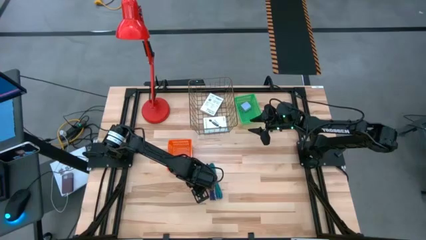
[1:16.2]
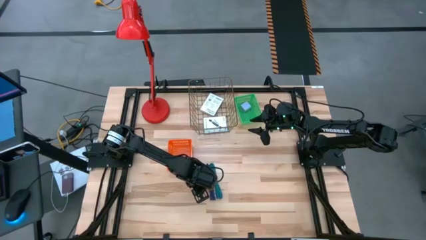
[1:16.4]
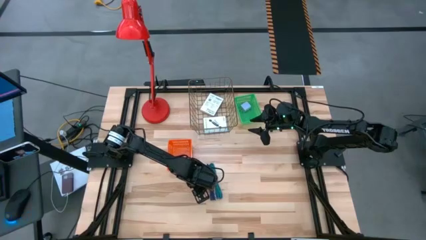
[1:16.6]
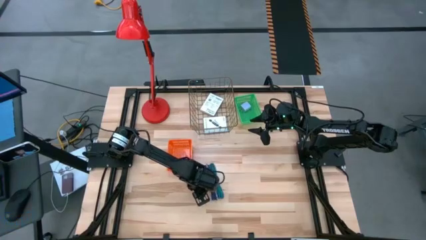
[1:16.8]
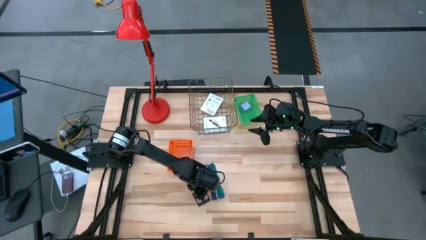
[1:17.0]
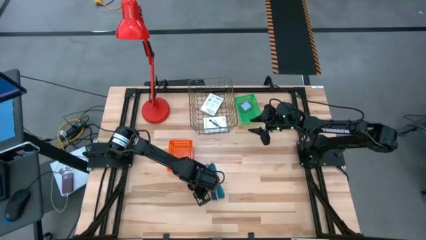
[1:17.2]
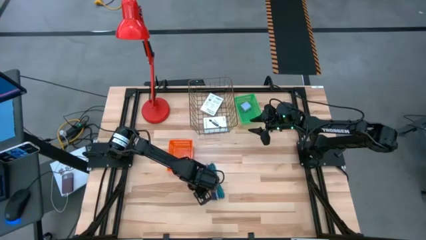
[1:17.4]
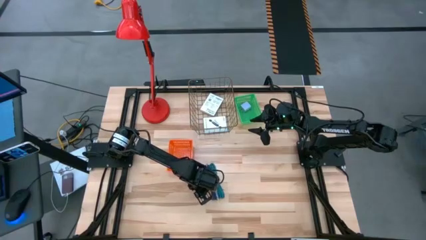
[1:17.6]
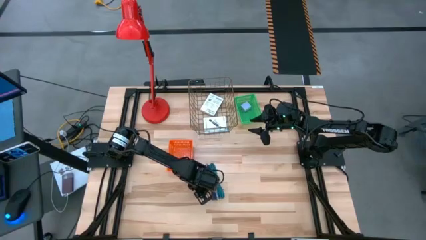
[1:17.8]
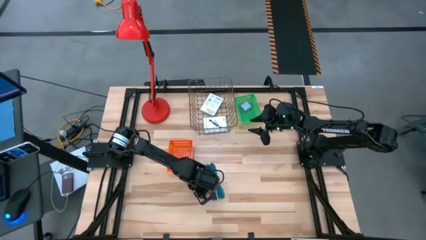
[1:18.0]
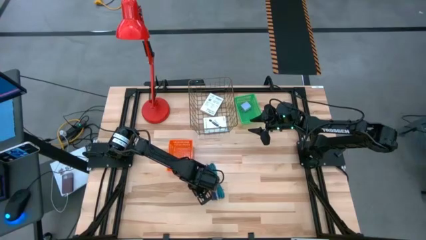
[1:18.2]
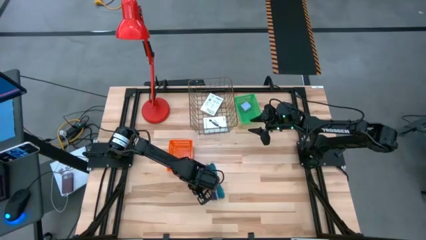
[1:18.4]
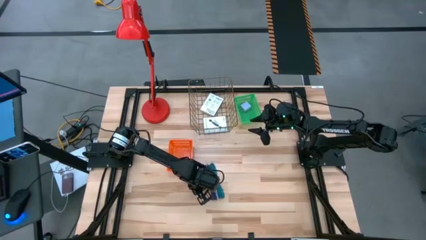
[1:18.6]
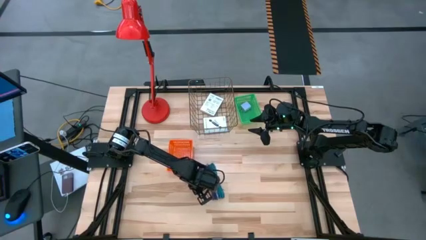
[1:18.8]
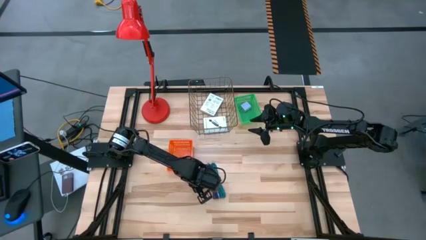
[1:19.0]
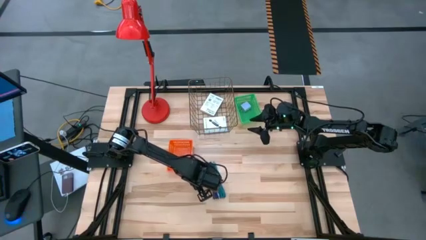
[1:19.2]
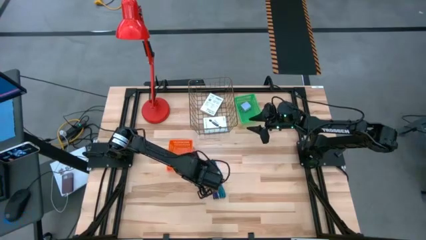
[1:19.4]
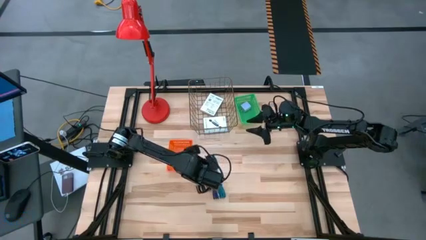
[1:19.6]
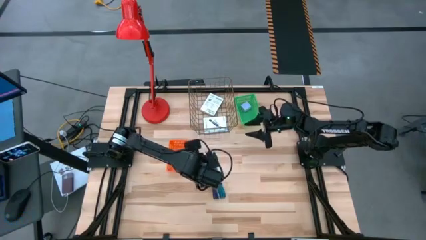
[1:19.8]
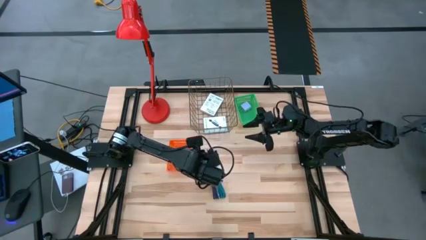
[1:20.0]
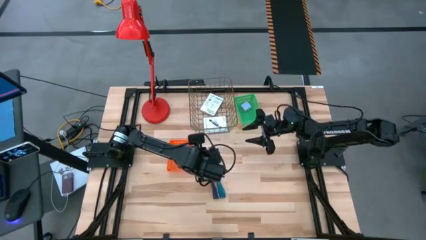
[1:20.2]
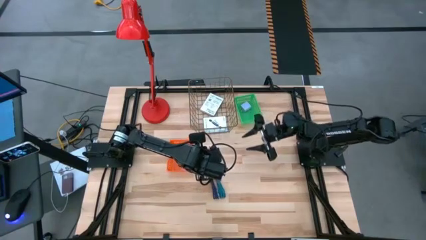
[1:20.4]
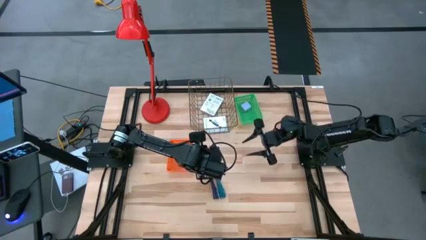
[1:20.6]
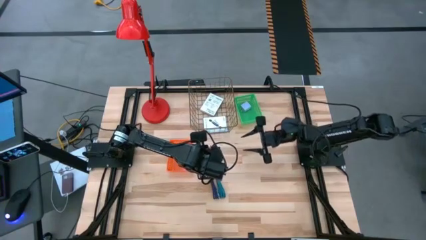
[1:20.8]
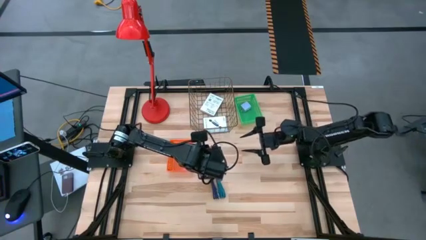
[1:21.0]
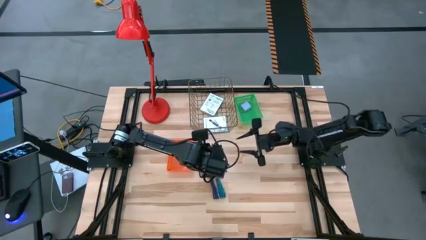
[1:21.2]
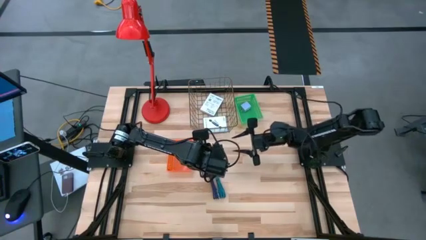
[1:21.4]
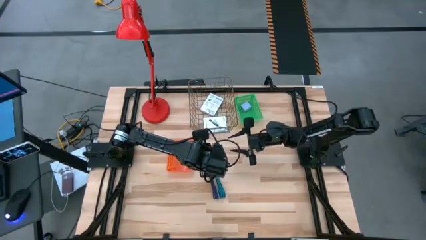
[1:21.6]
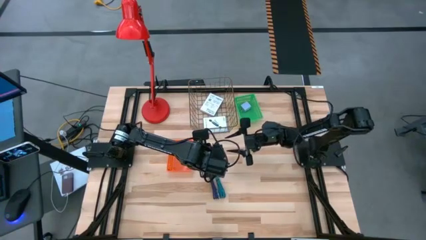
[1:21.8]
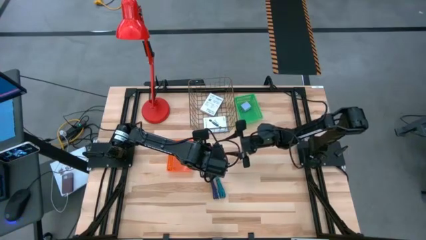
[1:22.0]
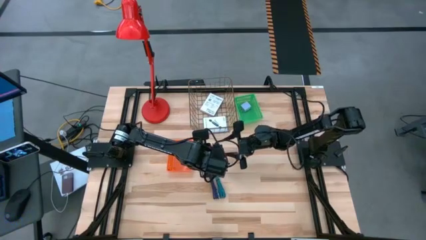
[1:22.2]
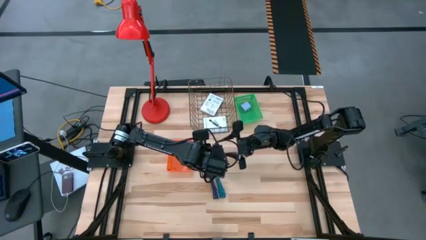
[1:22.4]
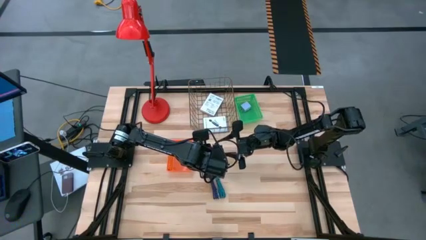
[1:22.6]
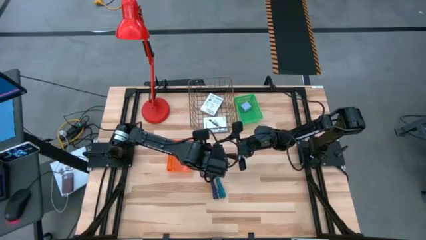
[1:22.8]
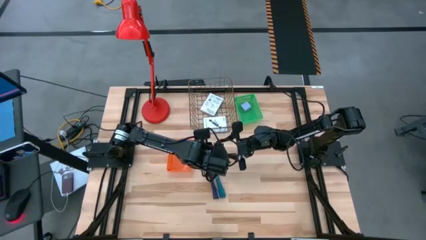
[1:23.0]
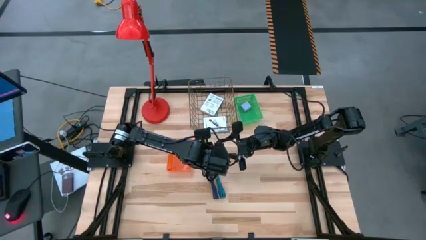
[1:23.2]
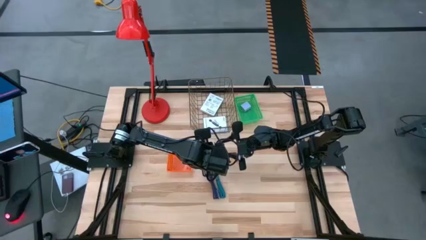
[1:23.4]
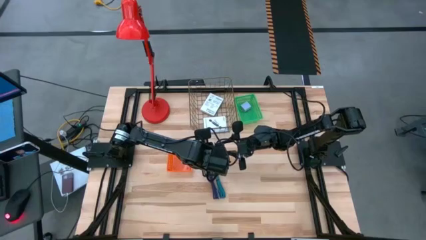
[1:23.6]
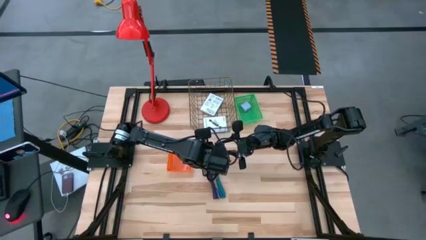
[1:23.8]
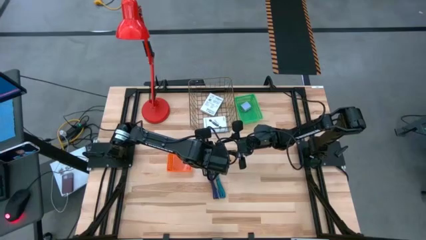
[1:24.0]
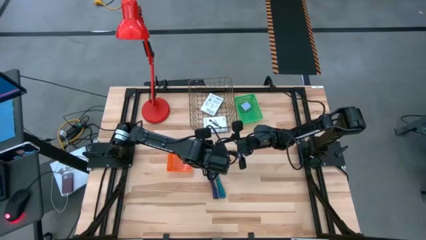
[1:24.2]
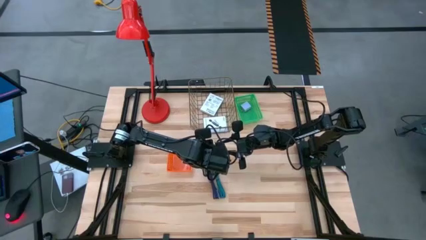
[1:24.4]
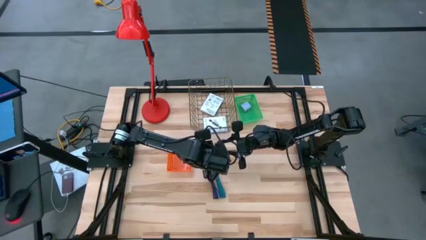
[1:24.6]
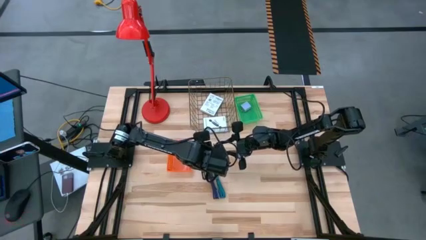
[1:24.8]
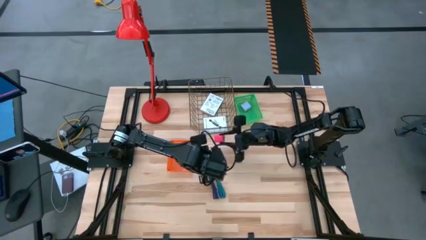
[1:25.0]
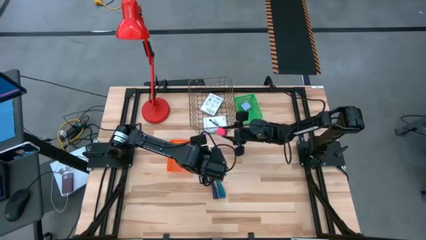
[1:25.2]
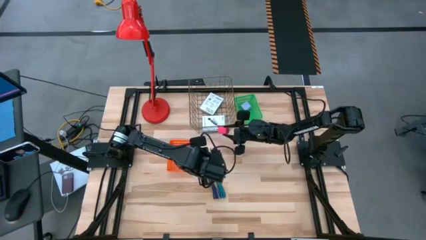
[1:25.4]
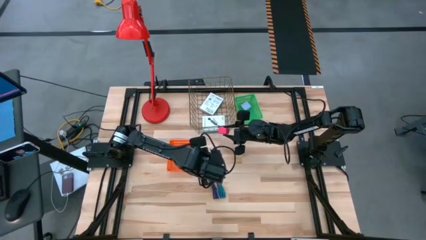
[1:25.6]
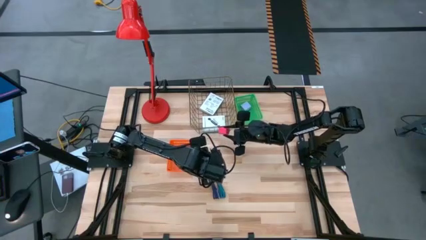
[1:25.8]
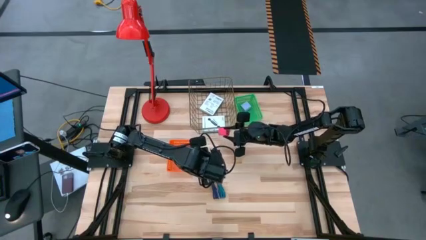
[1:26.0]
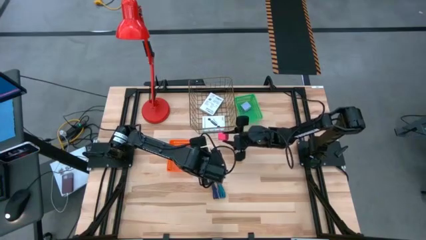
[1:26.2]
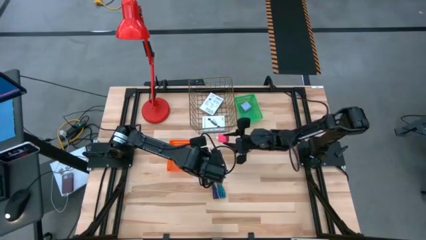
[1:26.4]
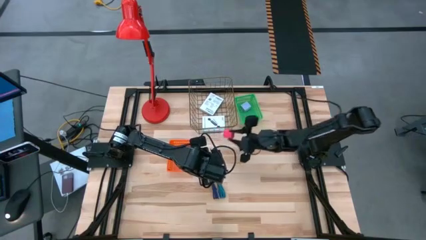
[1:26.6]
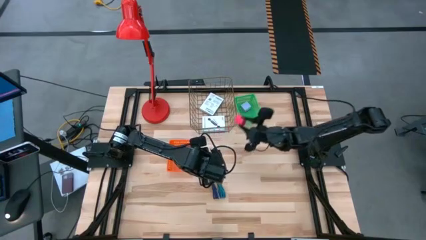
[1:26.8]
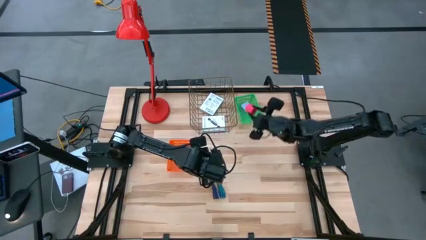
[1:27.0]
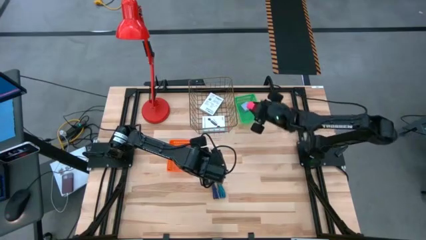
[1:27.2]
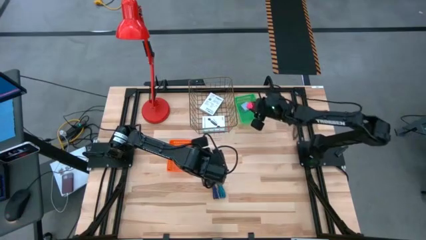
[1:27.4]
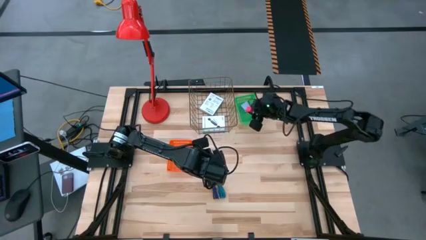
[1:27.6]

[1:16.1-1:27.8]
Task: Pick and place items into bin
Put the pink charger adapter into the green bin

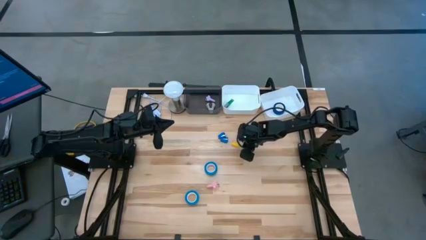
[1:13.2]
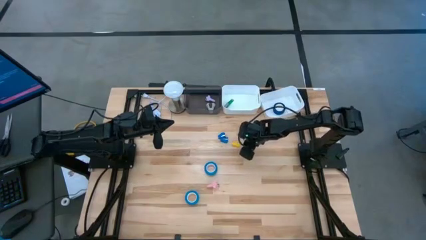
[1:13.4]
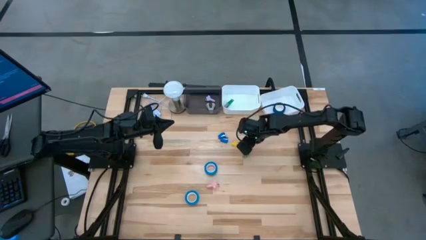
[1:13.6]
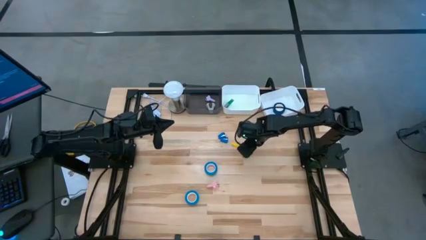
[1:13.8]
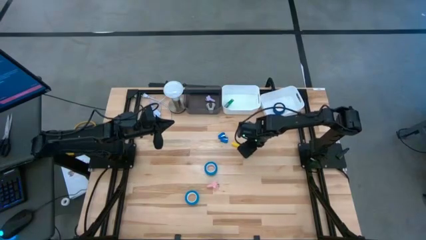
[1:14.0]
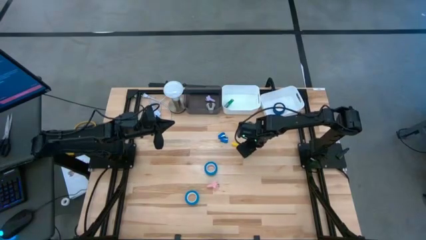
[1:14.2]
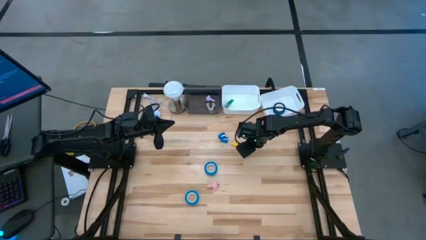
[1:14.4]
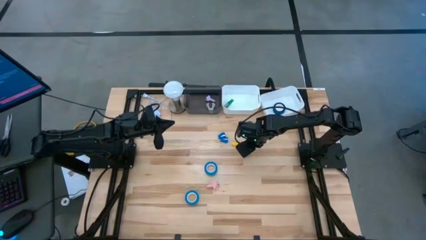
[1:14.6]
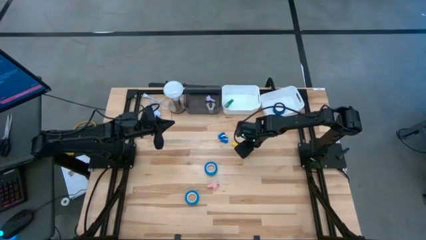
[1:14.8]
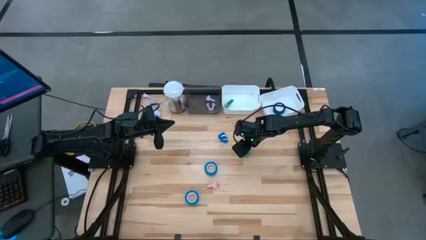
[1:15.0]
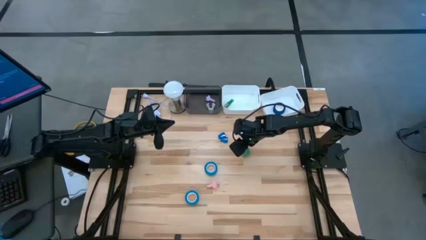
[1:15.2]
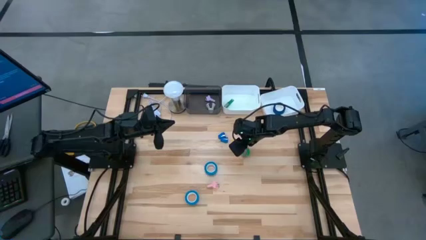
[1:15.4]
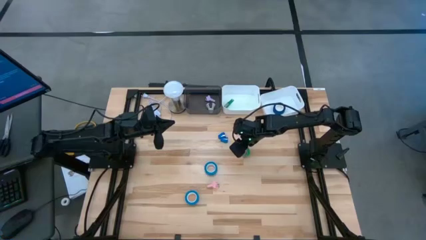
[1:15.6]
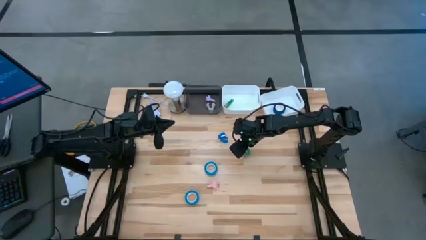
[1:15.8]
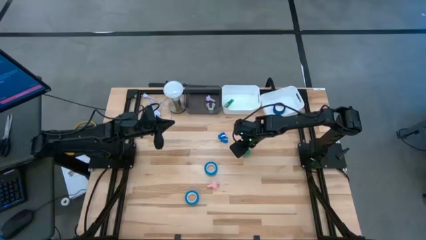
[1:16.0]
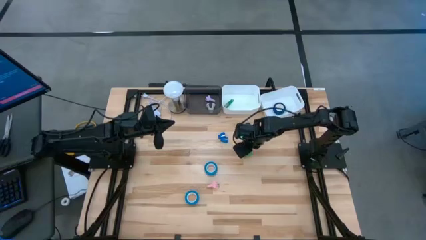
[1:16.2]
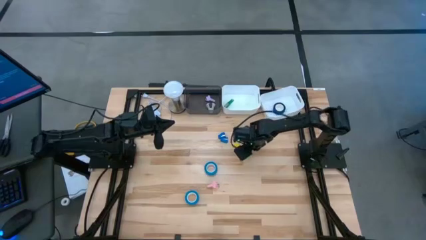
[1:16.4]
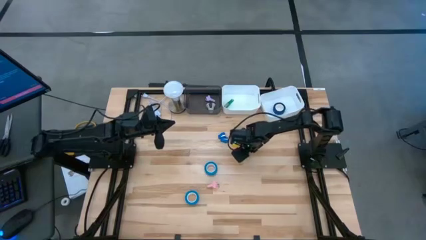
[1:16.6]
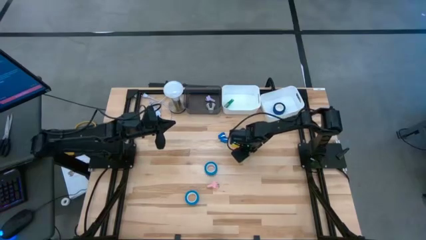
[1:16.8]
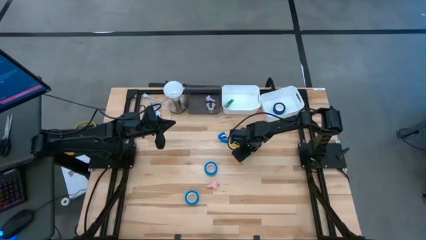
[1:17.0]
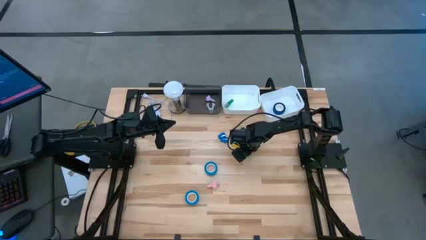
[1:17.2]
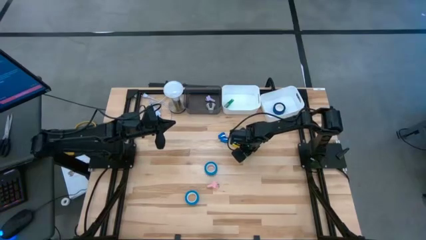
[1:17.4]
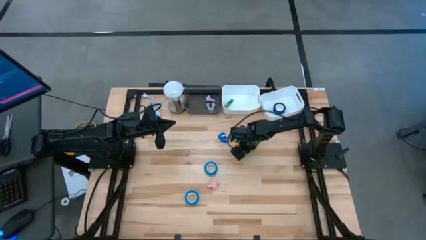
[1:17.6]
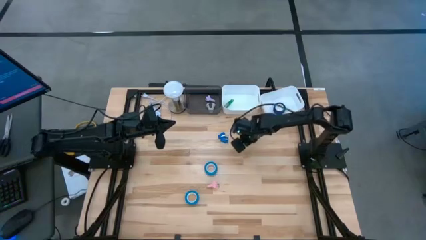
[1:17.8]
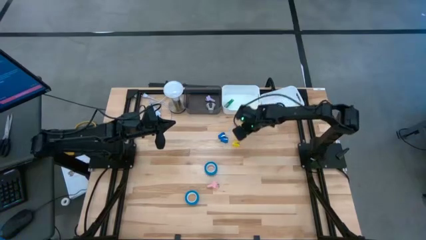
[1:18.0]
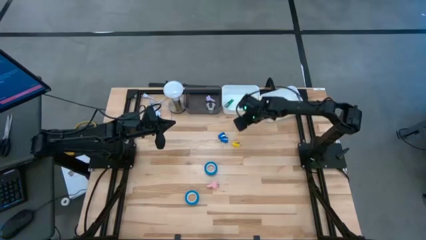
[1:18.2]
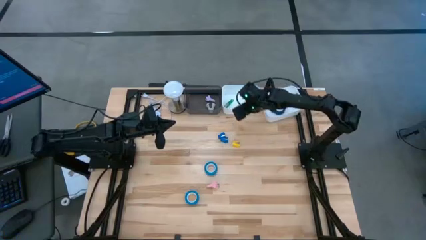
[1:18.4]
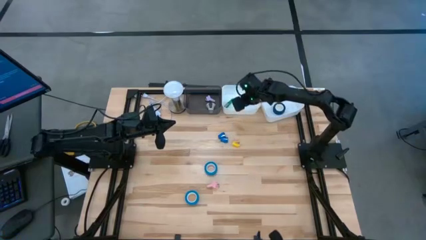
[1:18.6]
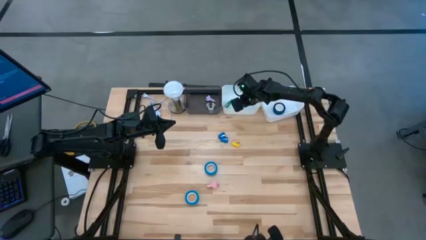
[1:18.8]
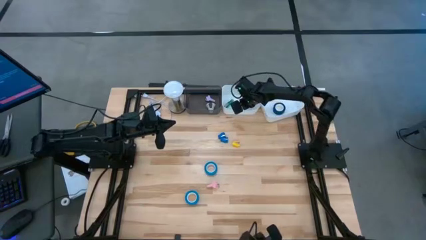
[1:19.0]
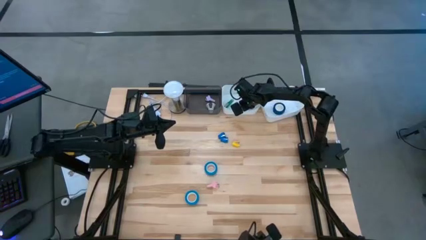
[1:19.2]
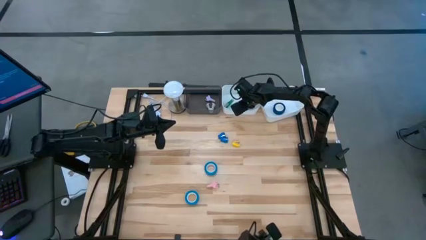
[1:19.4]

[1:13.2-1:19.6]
Task: Pick and place Stapler, Stapler remover, tape
Put the green stapler into the left white bin
